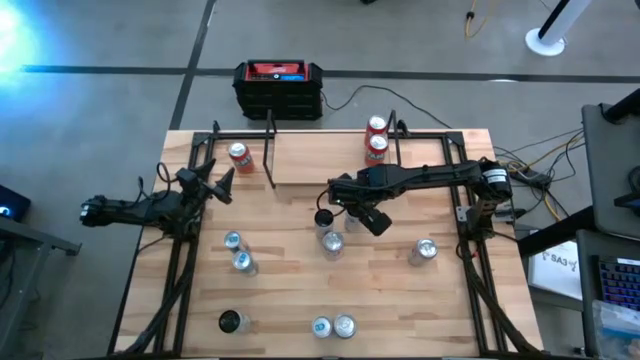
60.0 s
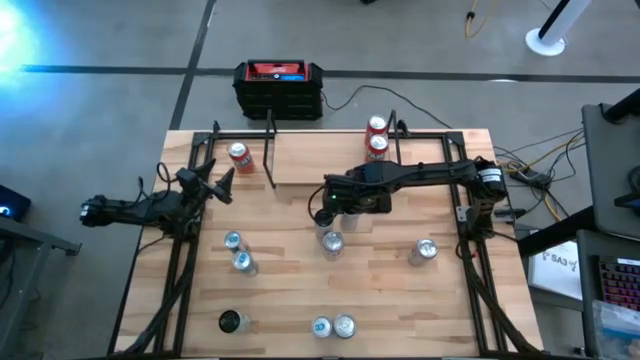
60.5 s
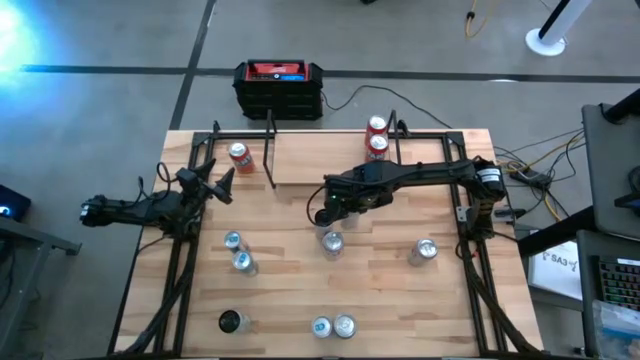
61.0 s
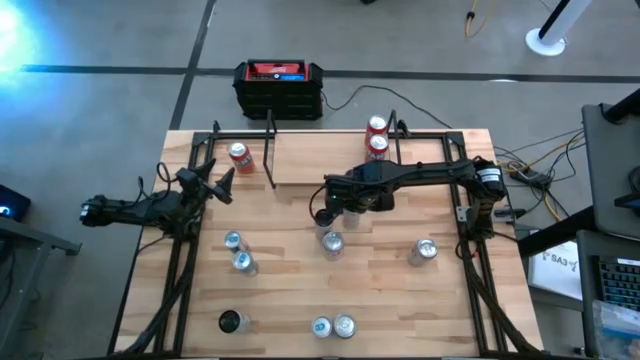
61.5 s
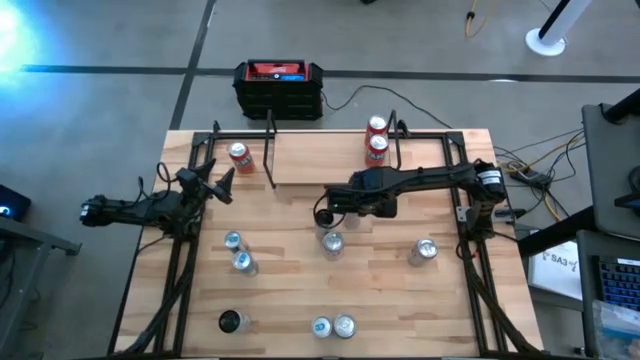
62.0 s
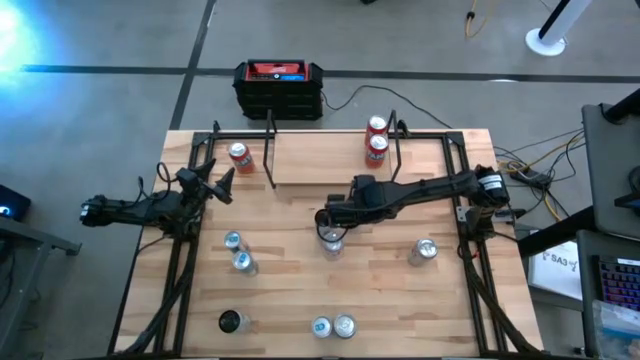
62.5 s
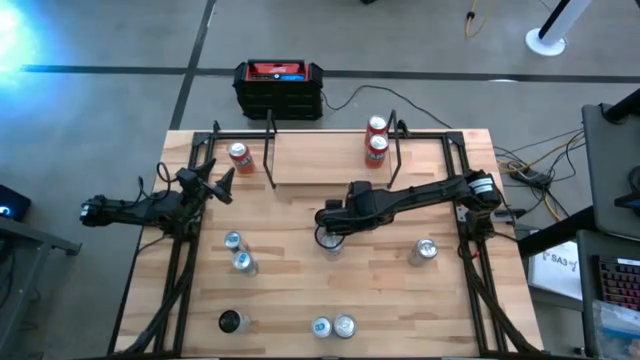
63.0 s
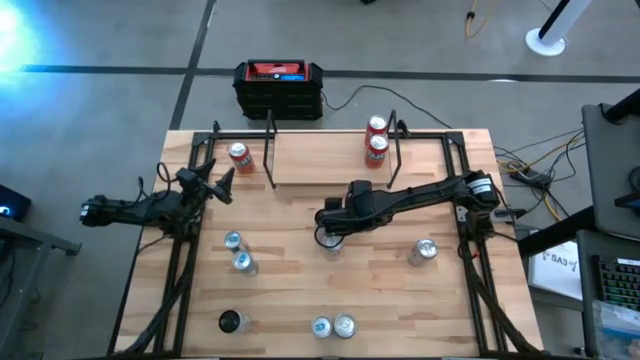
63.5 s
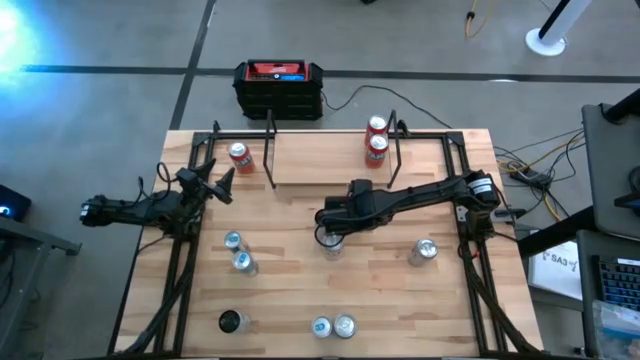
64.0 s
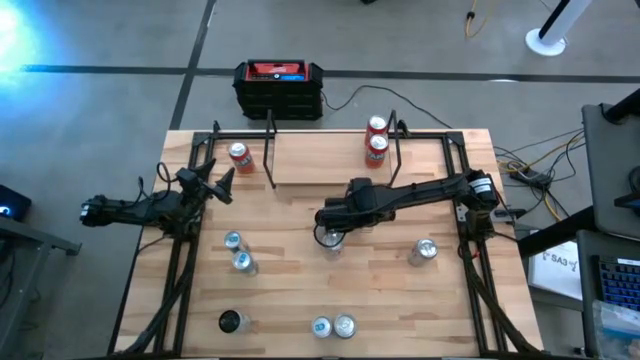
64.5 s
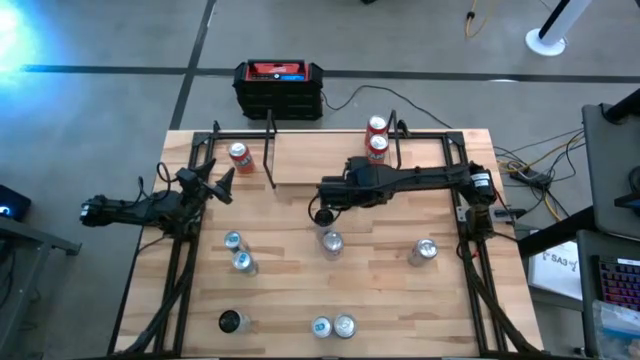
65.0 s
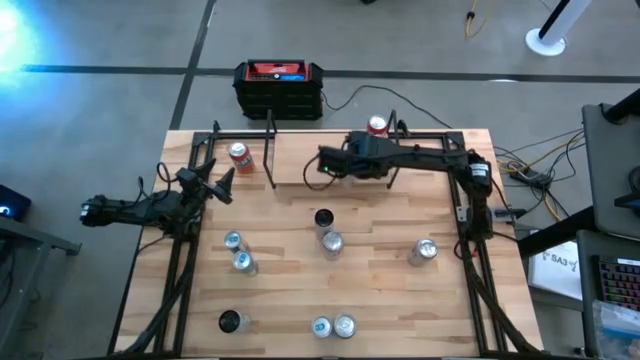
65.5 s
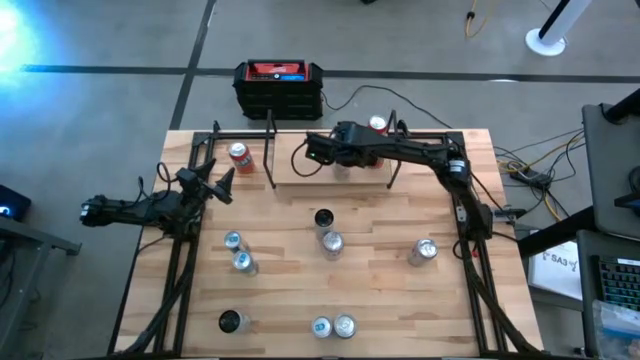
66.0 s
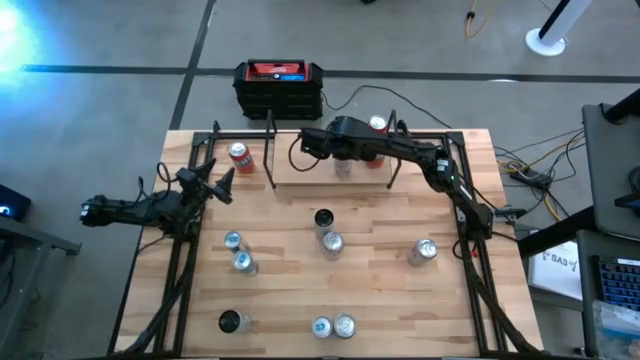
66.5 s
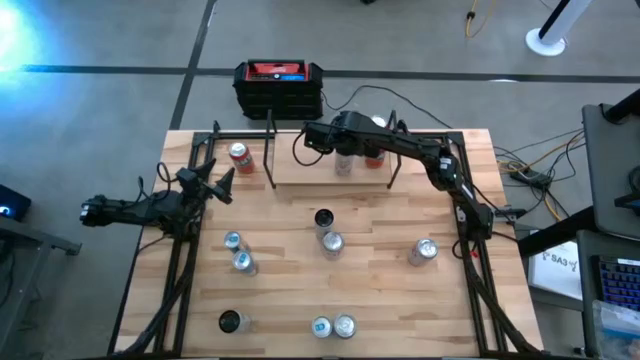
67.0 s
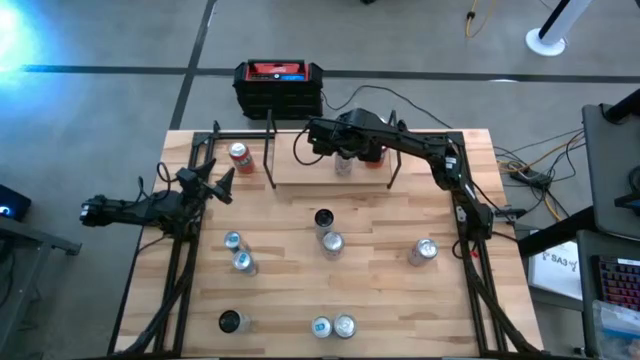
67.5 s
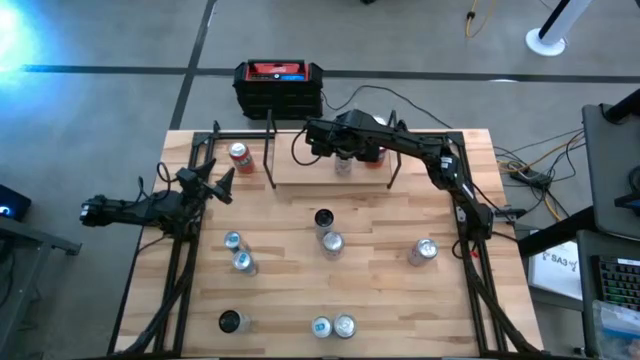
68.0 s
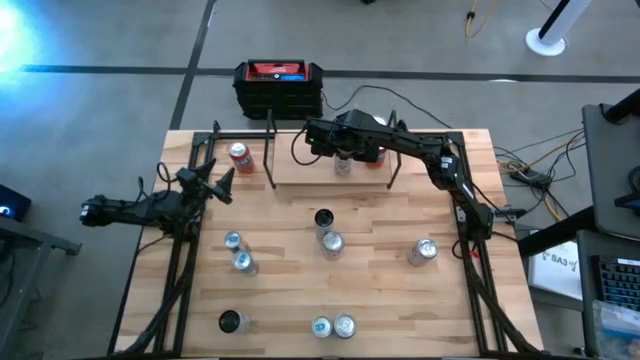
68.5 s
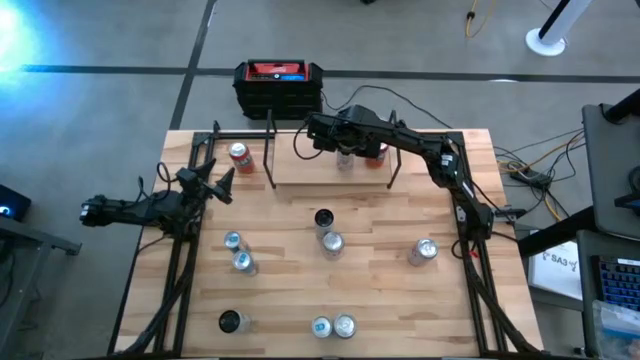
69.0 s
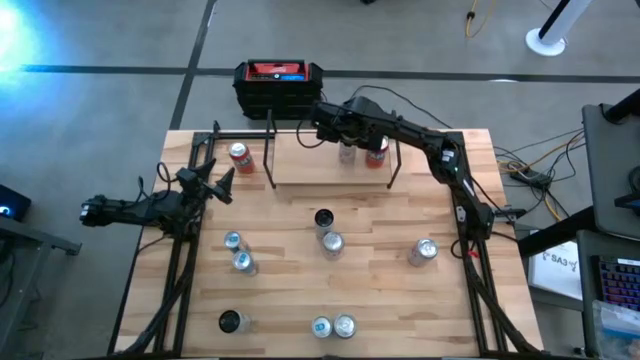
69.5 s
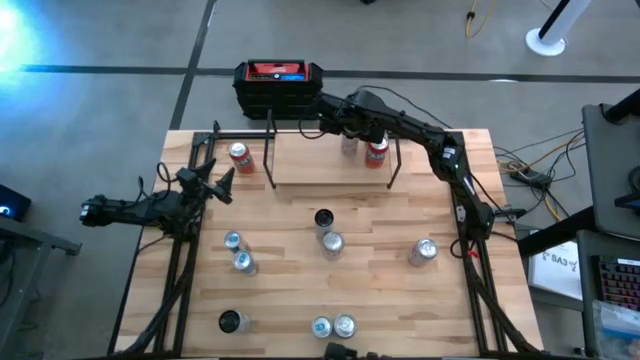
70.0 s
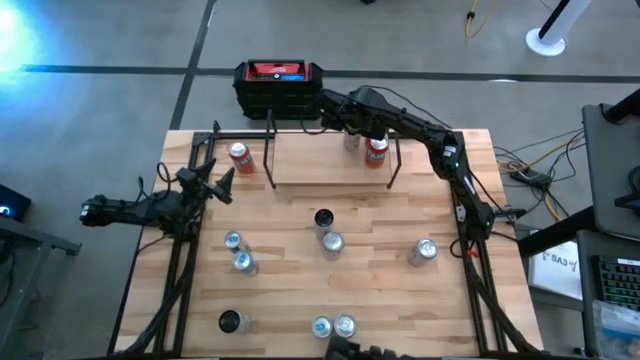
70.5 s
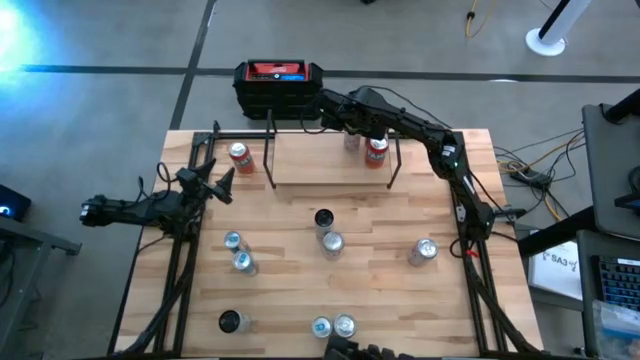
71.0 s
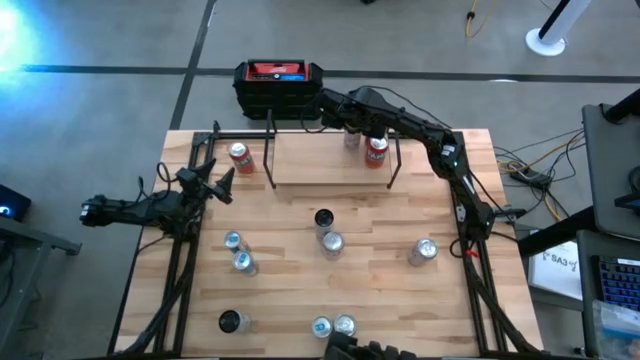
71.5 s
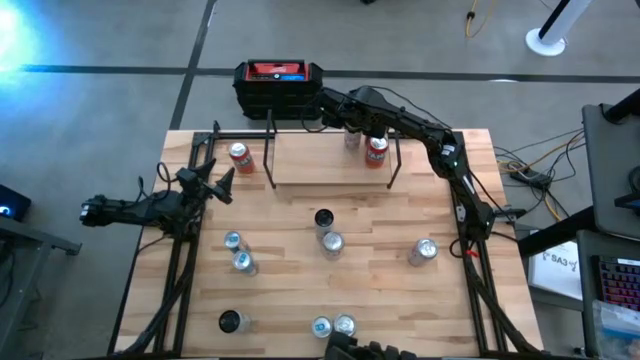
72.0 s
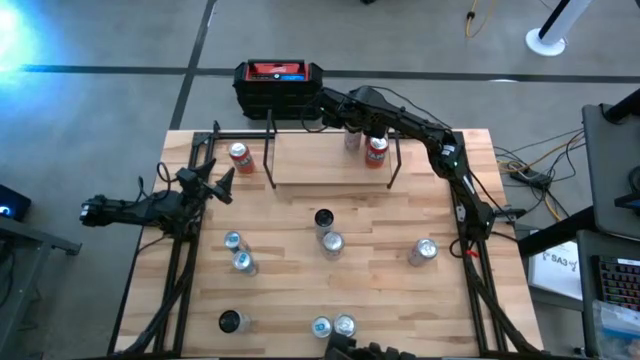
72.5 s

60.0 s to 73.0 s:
Task: Place canned beverage on shelf
Put the top white pink soda can on the shelf

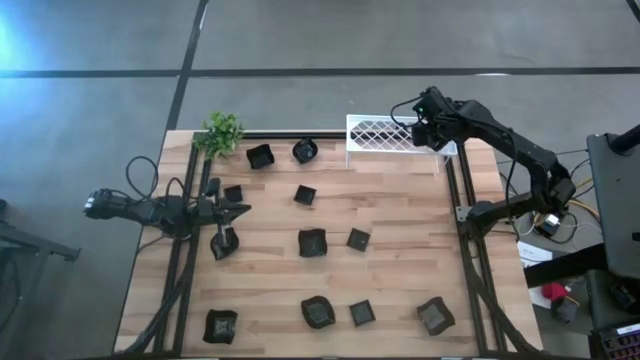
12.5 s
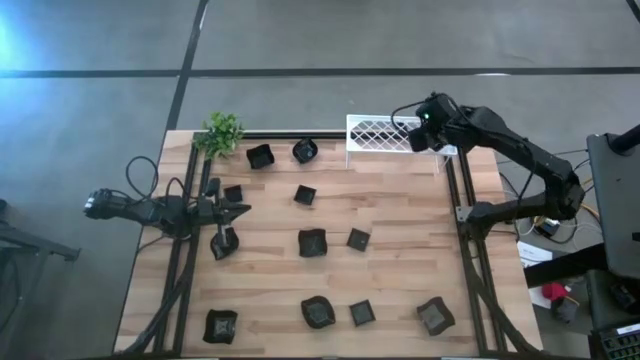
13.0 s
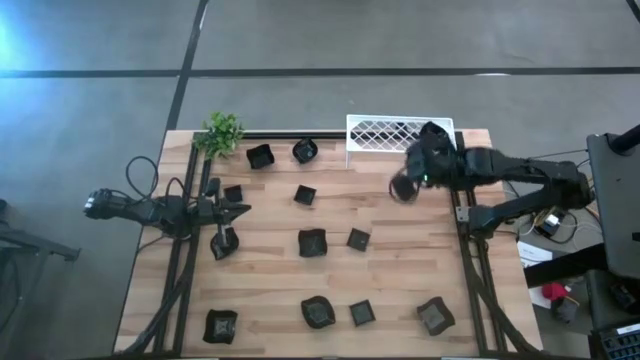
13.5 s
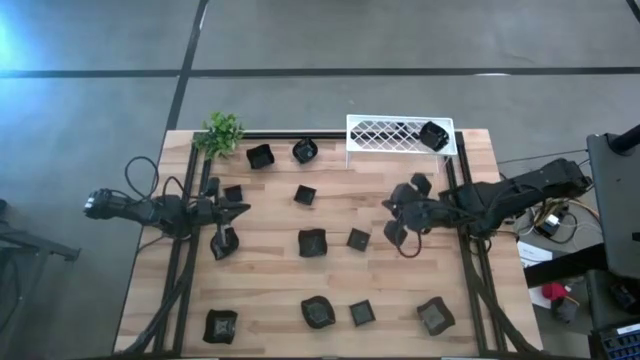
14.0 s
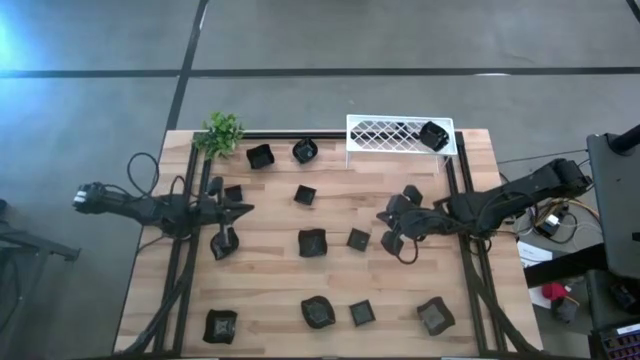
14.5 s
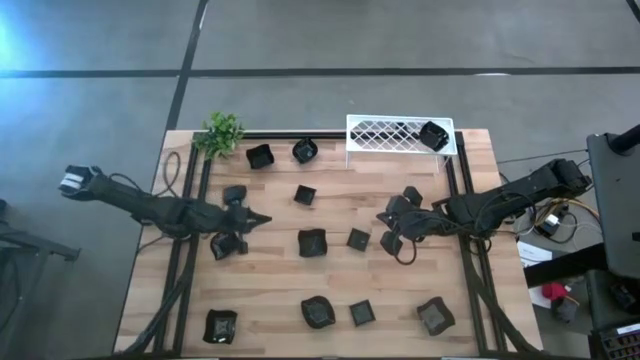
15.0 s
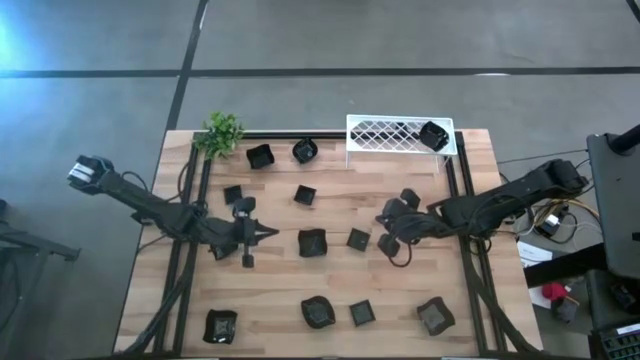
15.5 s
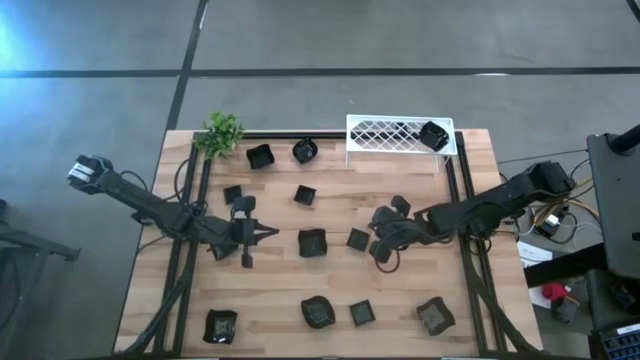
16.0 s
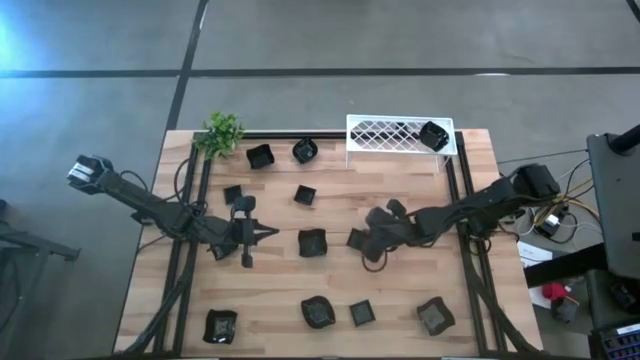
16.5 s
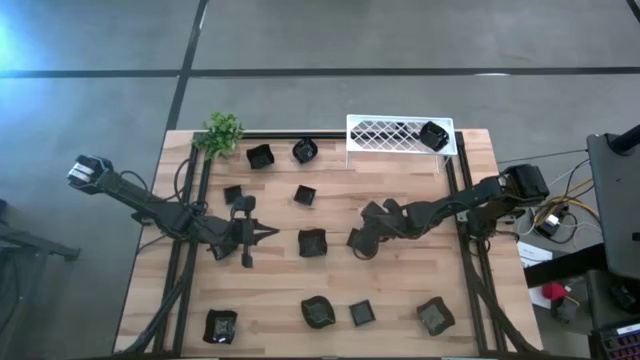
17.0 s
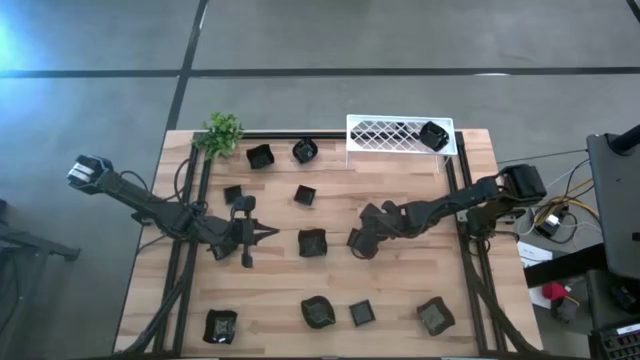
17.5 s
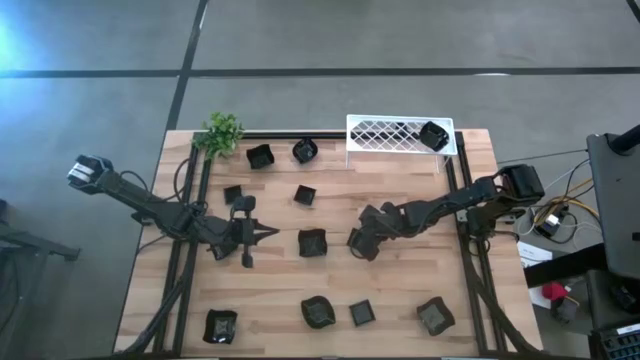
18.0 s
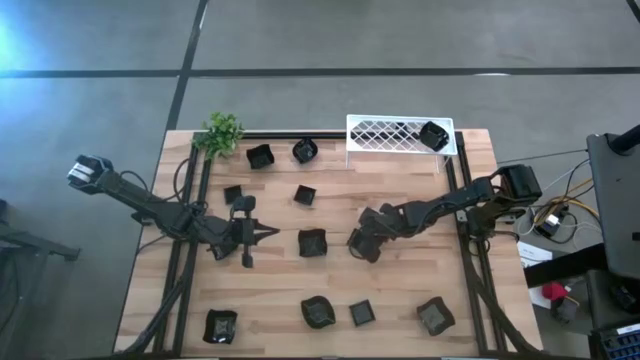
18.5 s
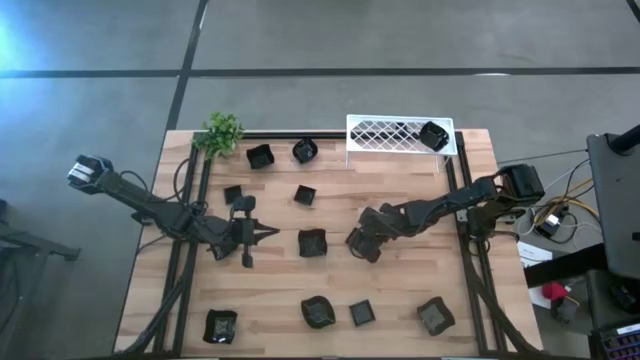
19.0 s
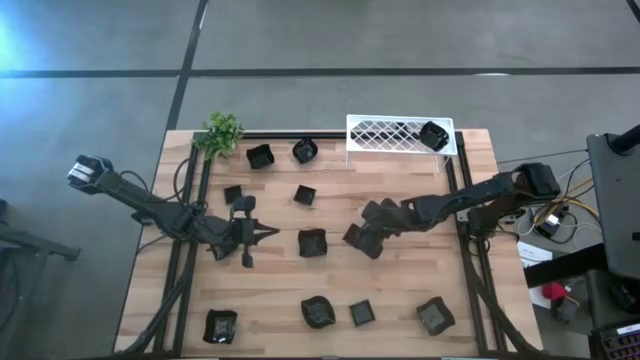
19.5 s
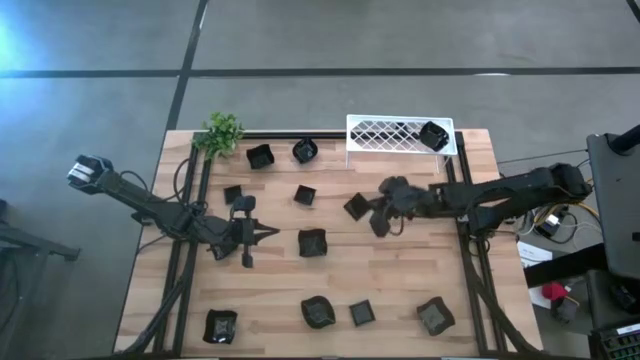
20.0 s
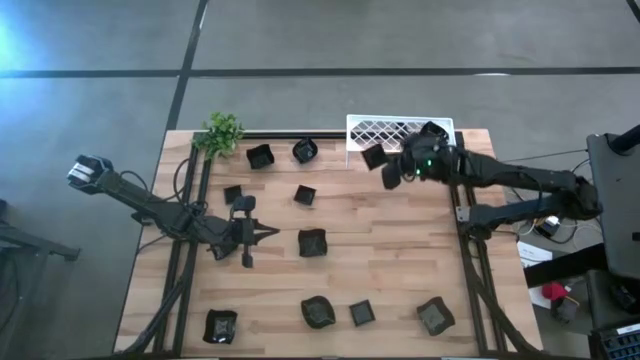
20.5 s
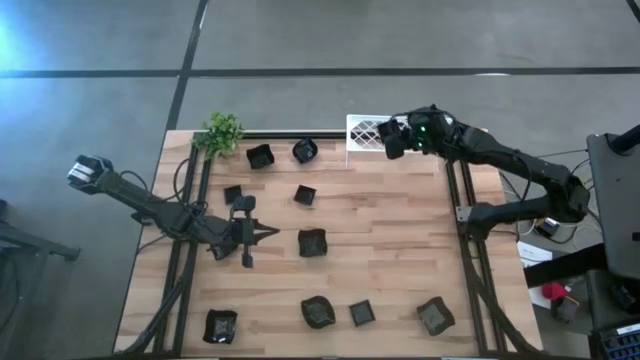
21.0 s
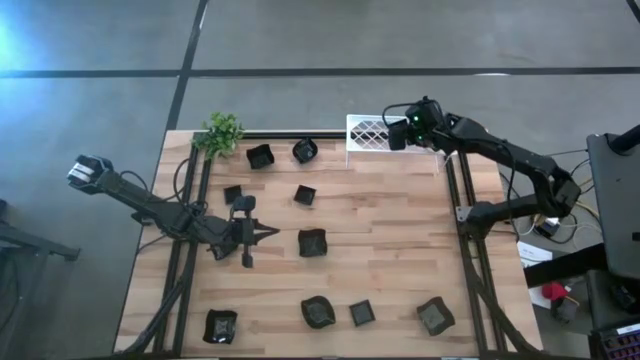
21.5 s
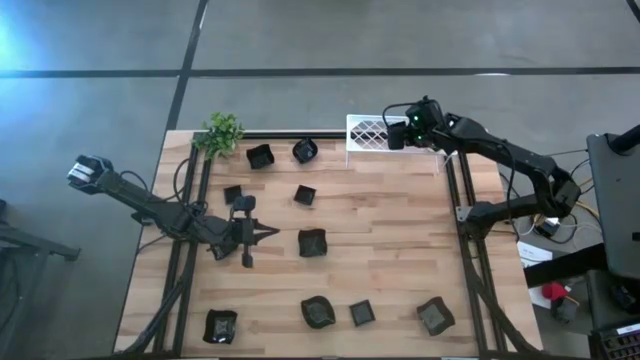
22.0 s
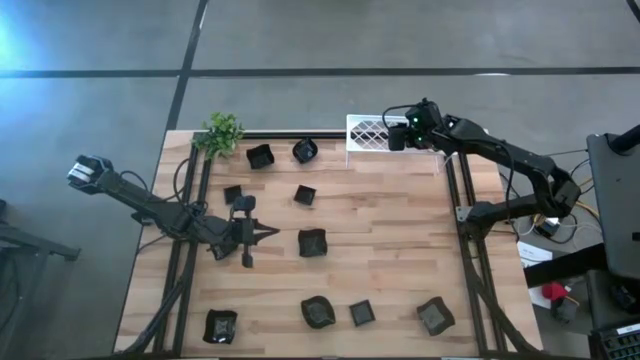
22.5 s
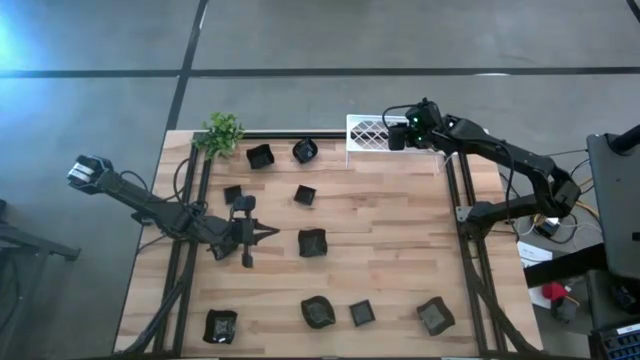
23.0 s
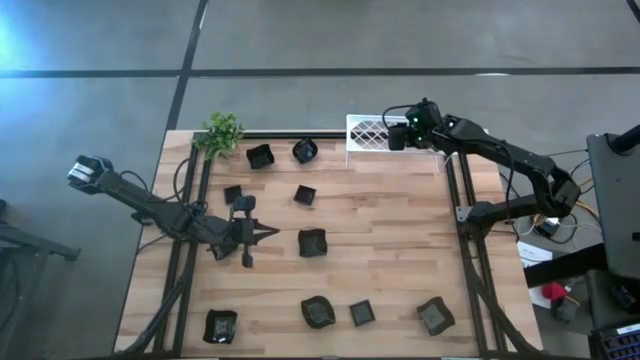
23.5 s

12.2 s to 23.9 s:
Task: Pick & Place Mini shaped plates
Put the black square plate on the shelf
